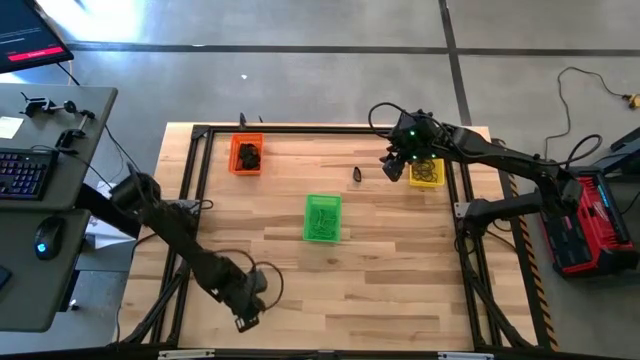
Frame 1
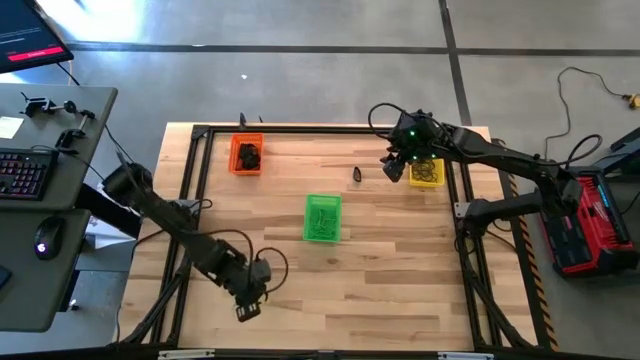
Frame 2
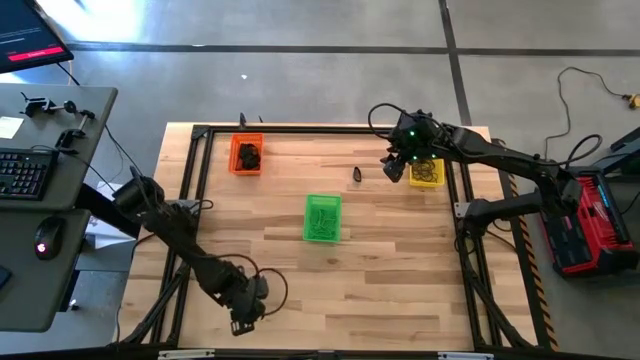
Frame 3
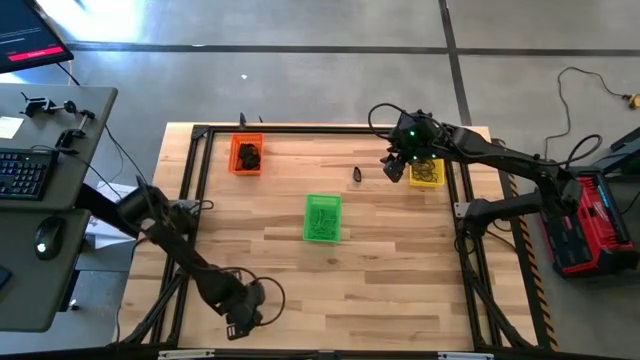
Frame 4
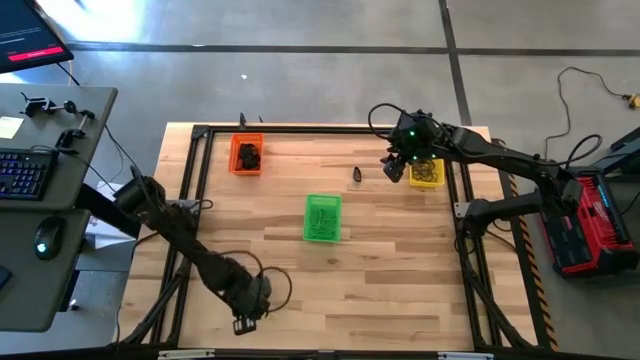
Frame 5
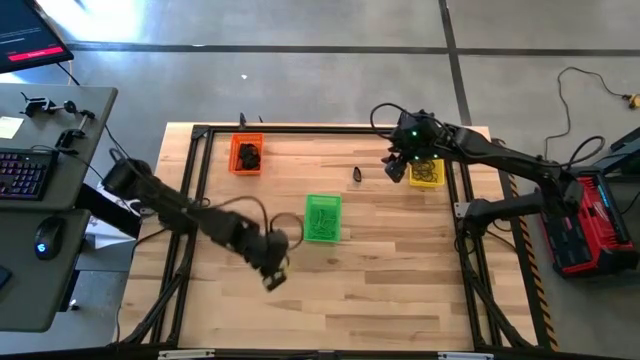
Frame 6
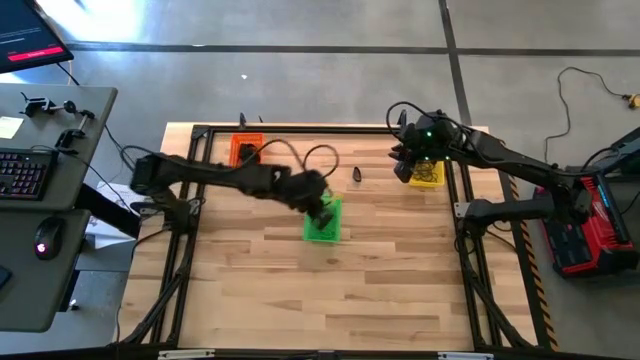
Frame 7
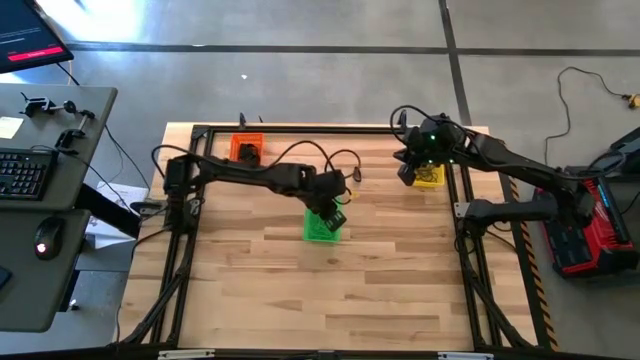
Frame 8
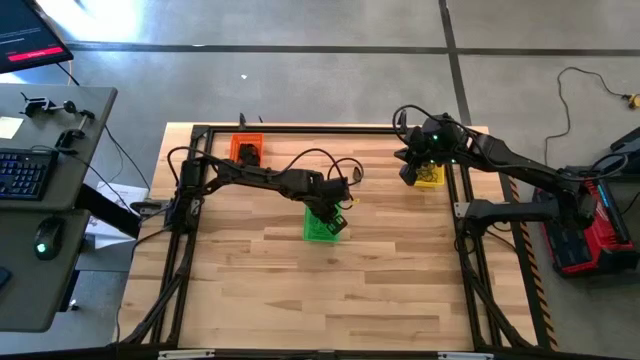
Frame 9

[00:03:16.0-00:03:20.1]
Task: Sort rubber bands into baskets
Put the green rubber band into the green bin

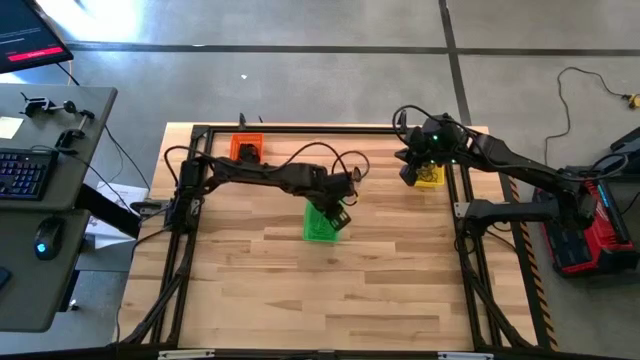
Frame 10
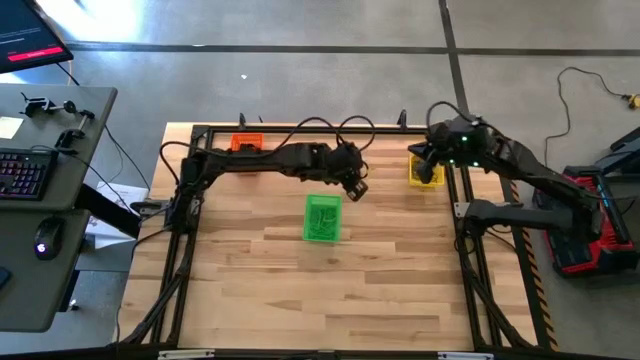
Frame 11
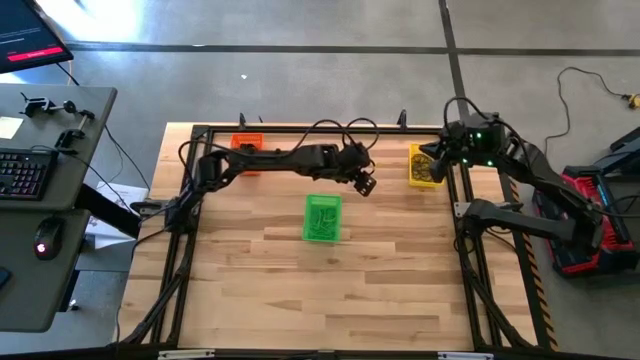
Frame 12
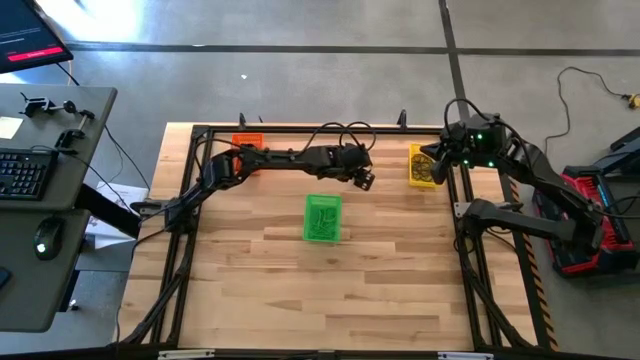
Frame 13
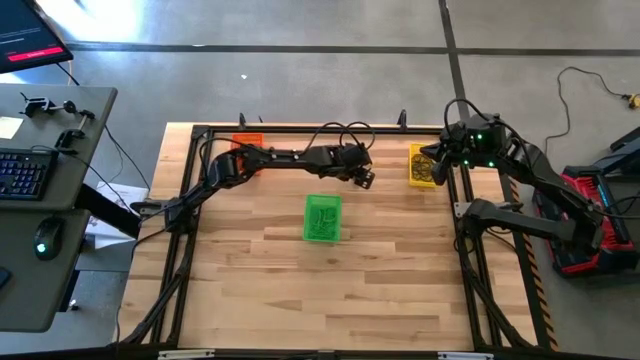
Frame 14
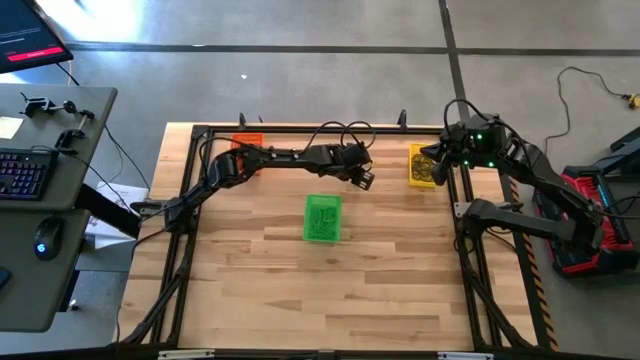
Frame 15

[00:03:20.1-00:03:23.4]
Put the black rubber band into the orange bin

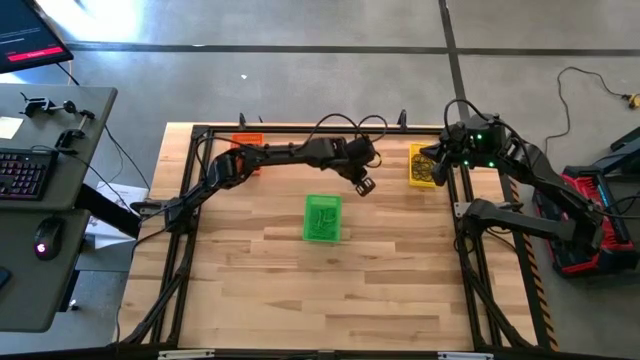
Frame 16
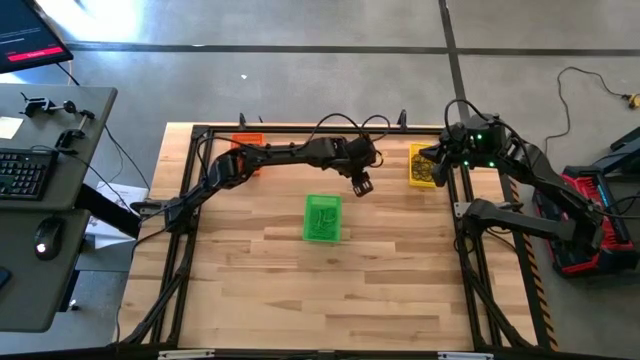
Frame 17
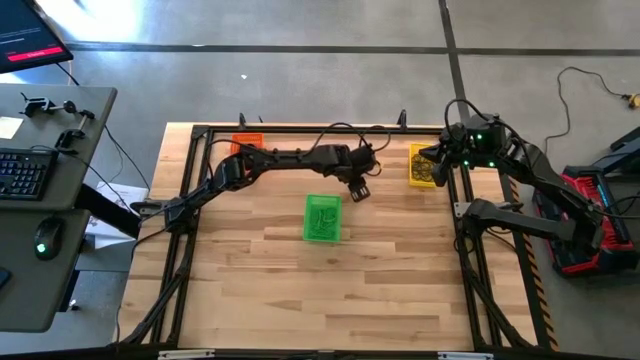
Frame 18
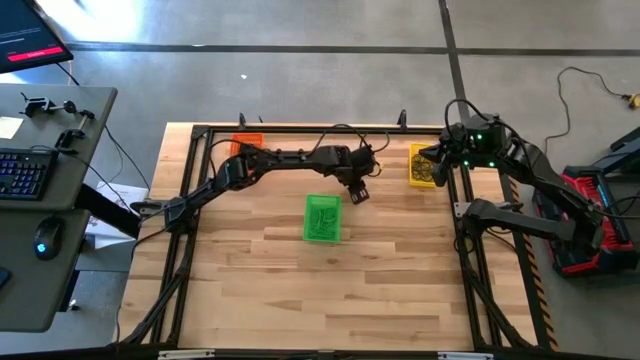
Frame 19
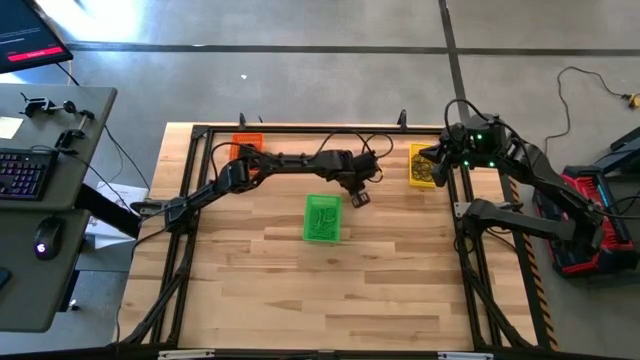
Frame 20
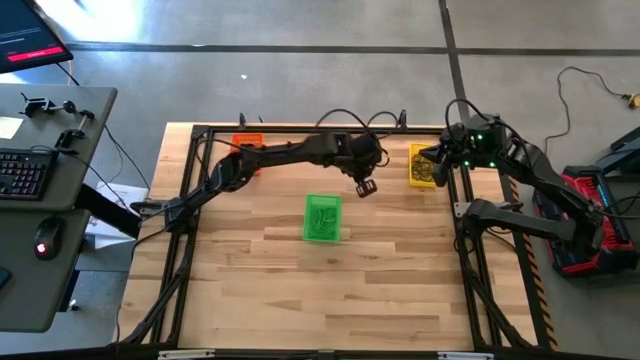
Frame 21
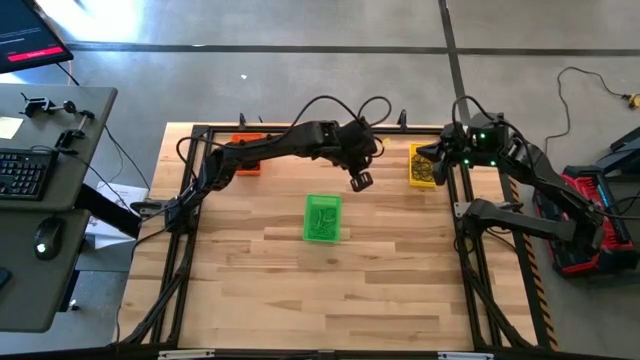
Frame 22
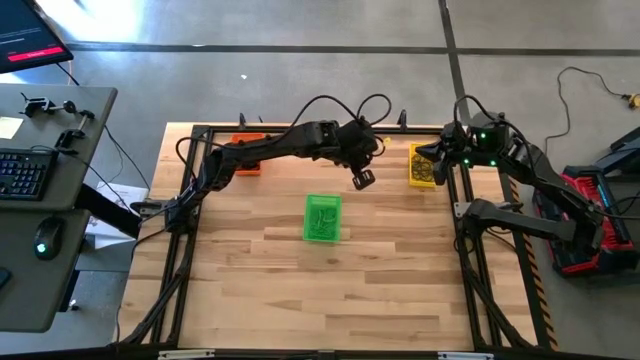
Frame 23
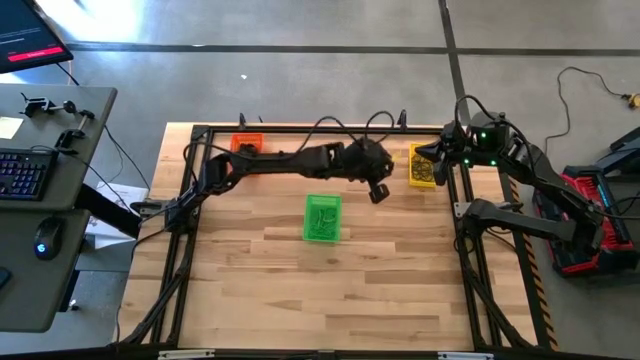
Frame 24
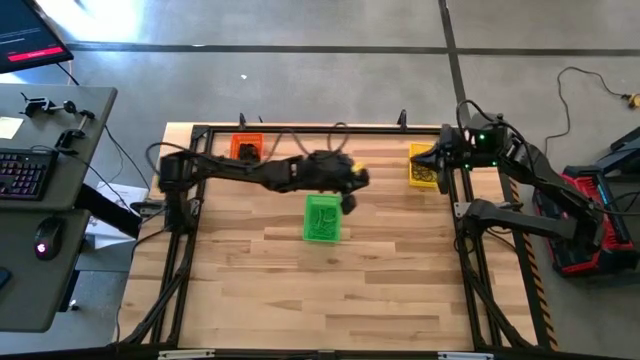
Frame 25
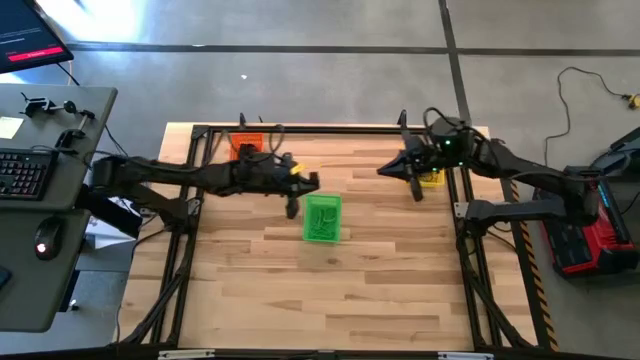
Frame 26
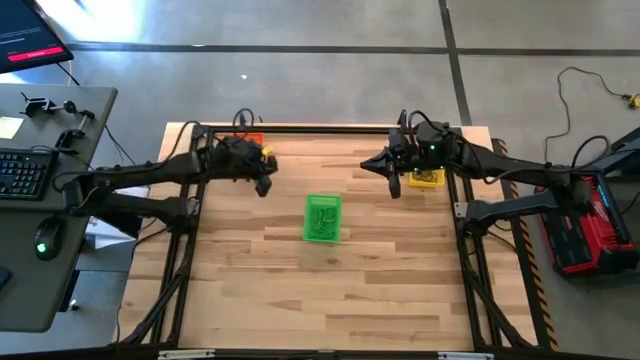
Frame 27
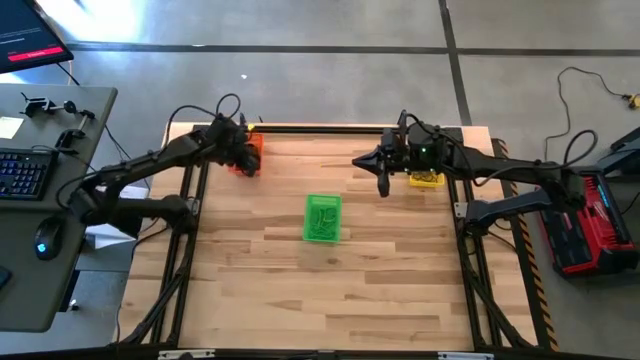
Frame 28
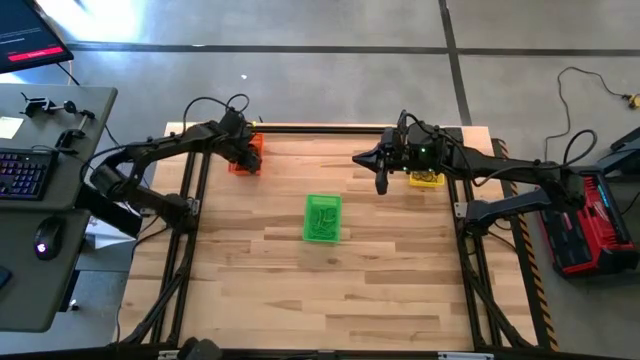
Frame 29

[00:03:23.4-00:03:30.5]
Put the black rubber band into the orange bin

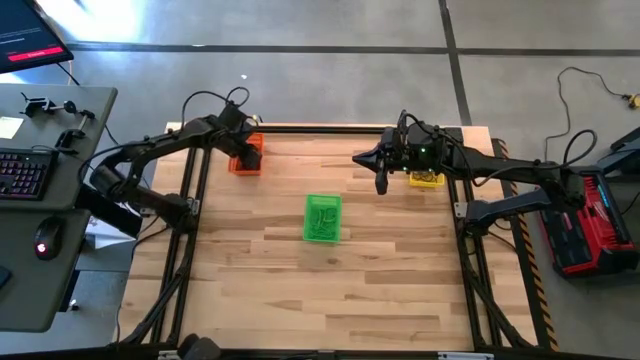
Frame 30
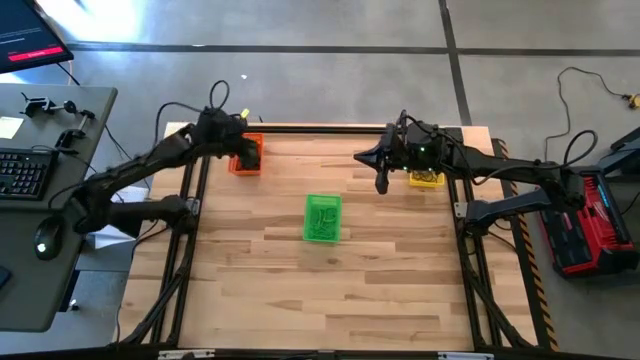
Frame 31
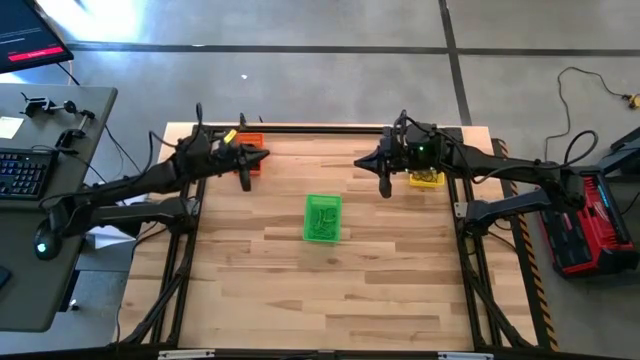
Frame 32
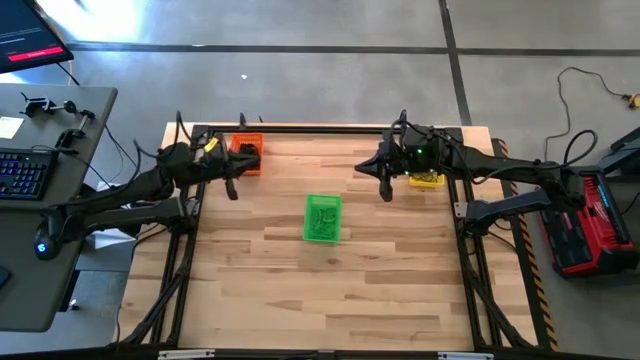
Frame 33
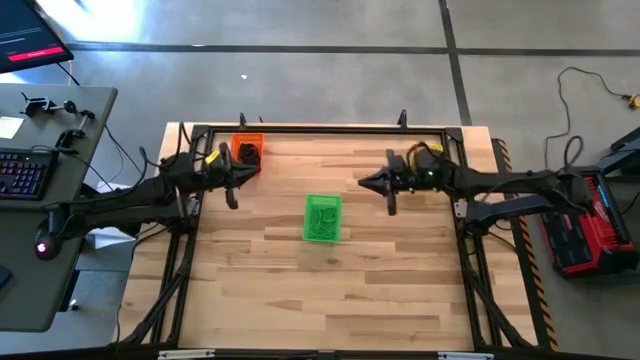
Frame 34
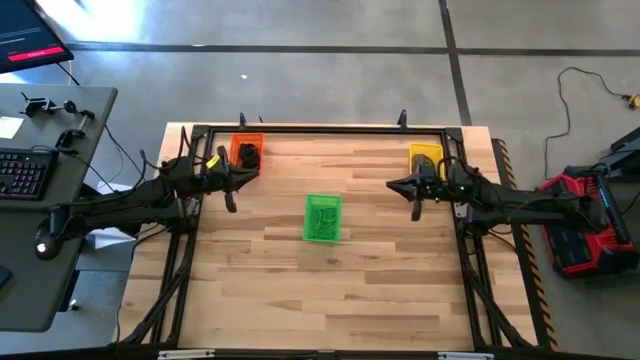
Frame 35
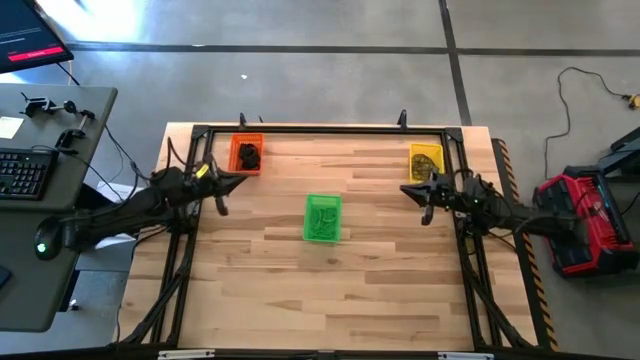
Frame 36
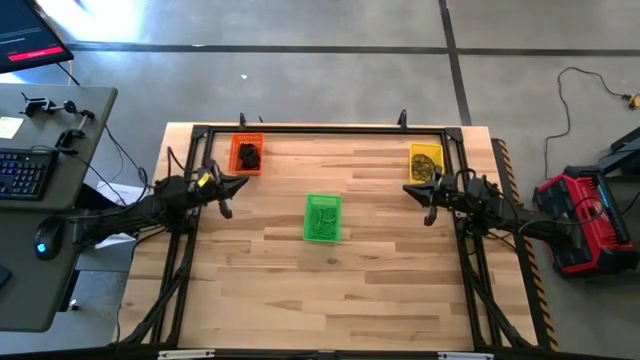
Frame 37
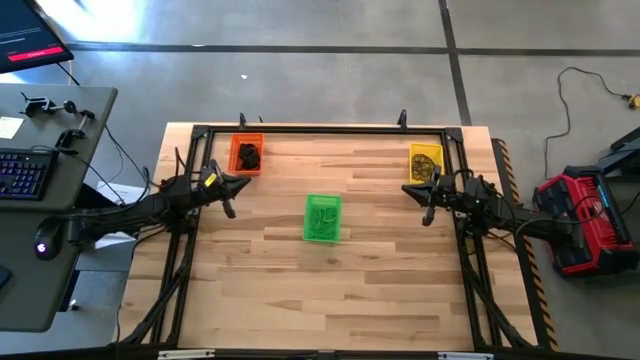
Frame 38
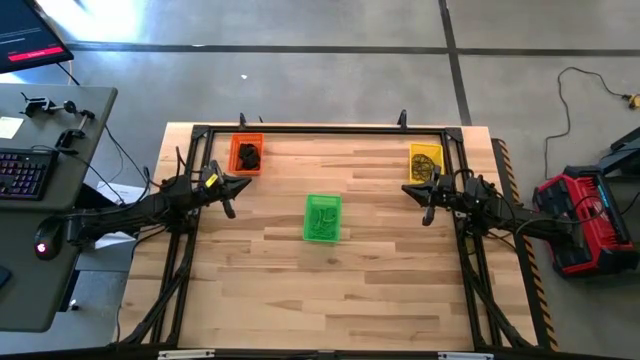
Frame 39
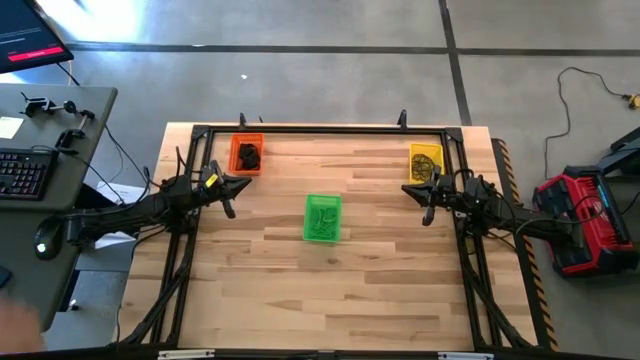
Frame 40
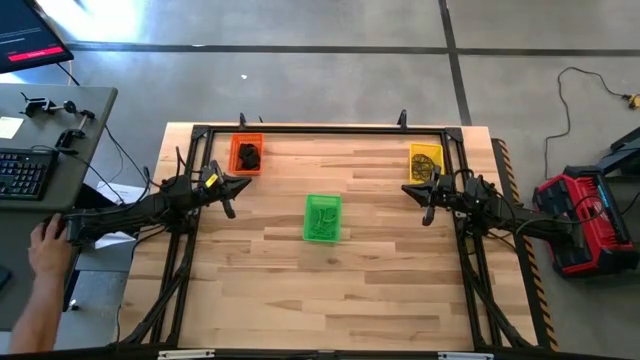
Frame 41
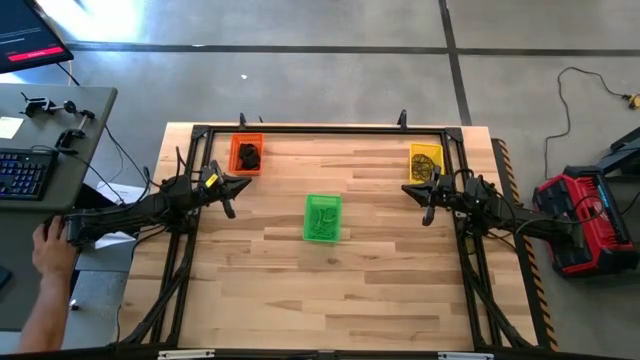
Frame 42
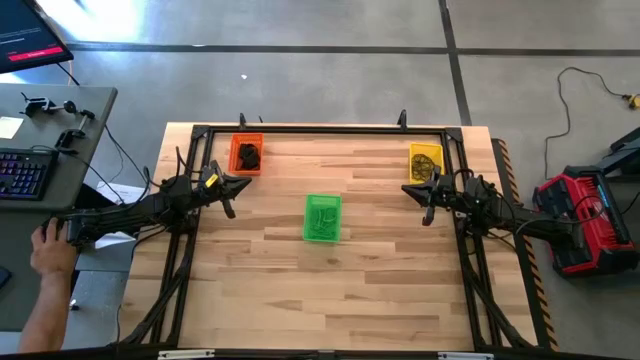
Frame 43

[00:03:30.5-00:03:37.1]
Return to Home Position
